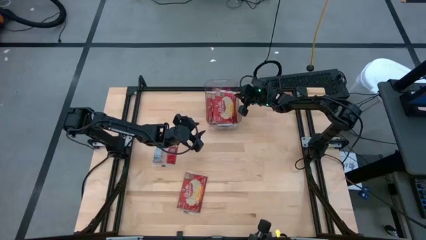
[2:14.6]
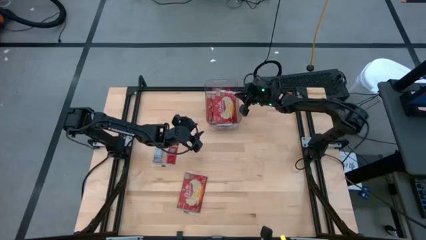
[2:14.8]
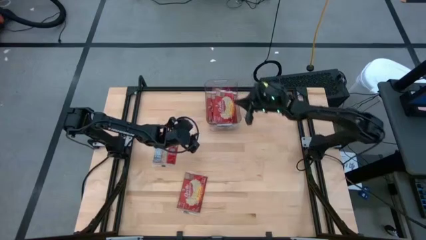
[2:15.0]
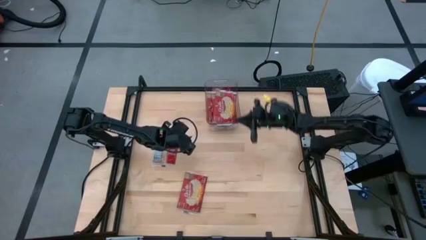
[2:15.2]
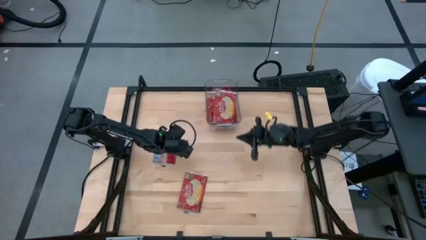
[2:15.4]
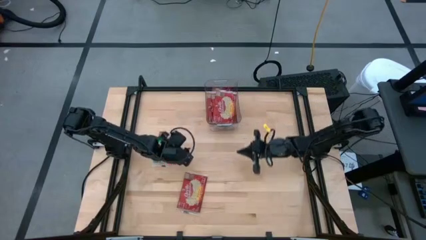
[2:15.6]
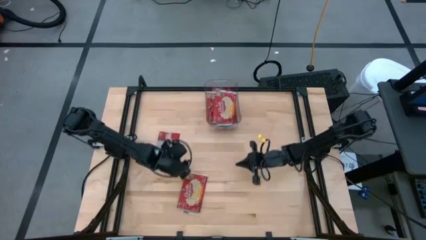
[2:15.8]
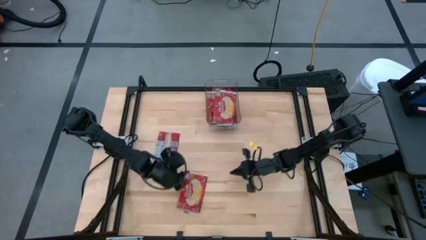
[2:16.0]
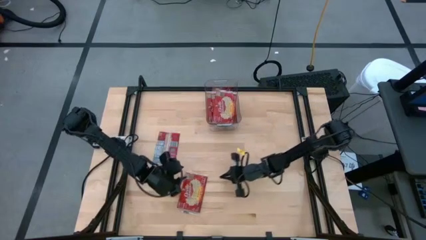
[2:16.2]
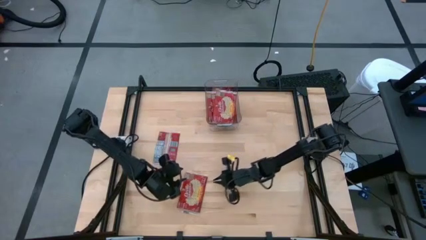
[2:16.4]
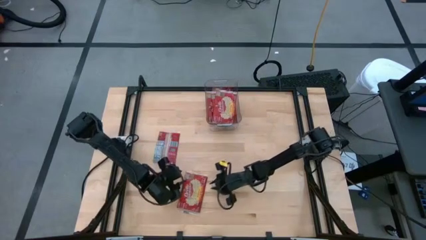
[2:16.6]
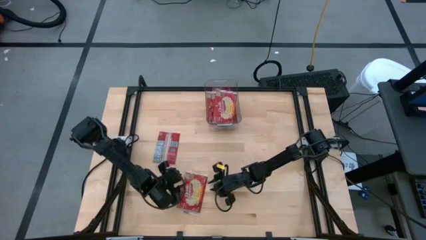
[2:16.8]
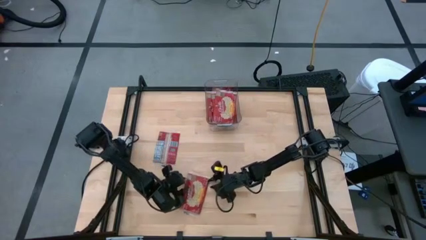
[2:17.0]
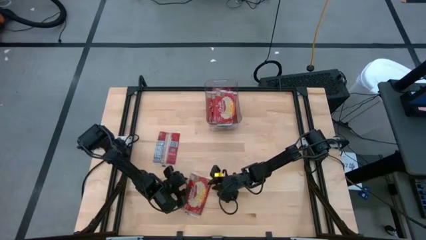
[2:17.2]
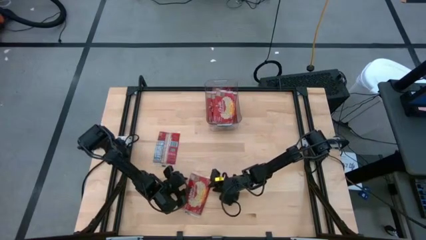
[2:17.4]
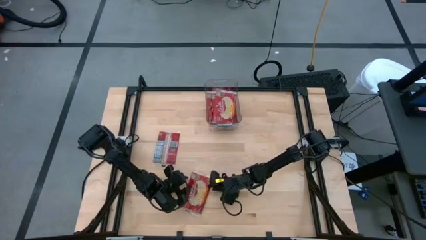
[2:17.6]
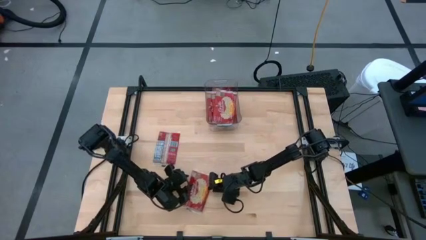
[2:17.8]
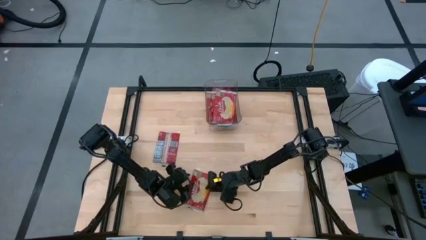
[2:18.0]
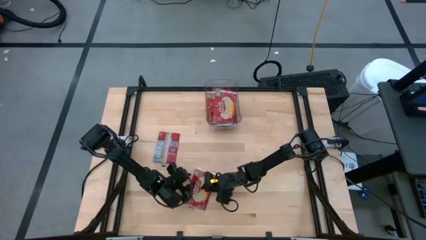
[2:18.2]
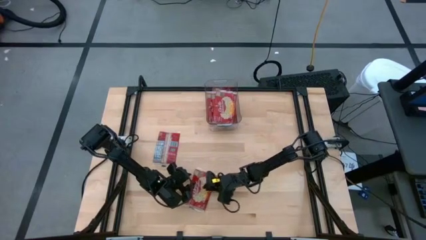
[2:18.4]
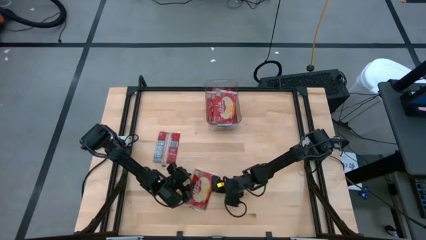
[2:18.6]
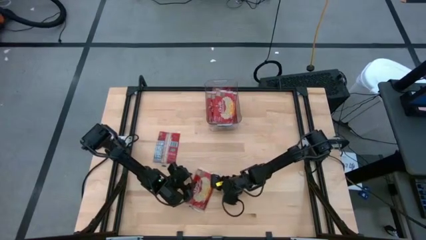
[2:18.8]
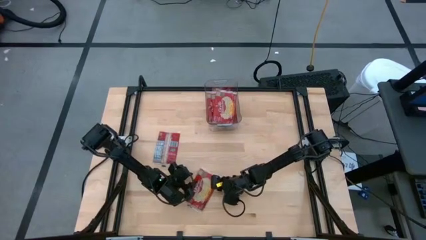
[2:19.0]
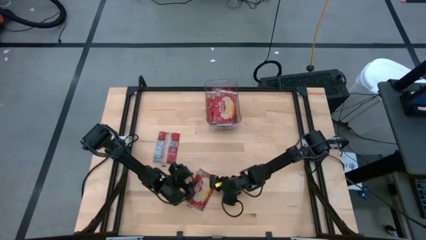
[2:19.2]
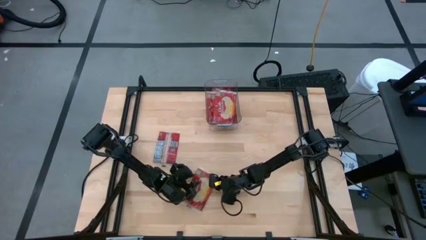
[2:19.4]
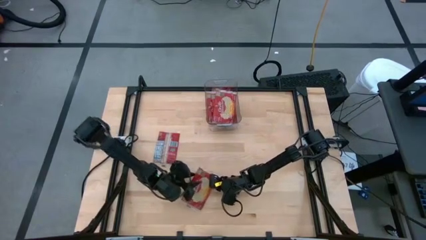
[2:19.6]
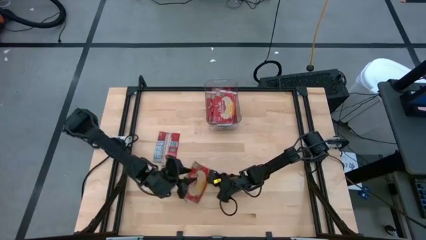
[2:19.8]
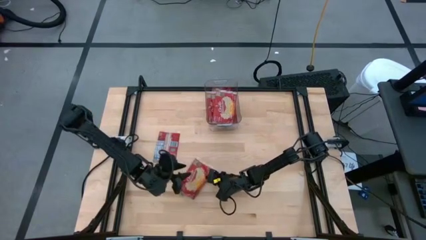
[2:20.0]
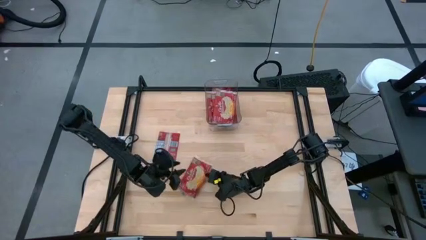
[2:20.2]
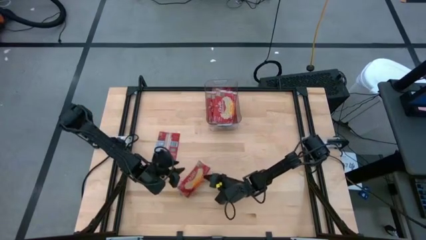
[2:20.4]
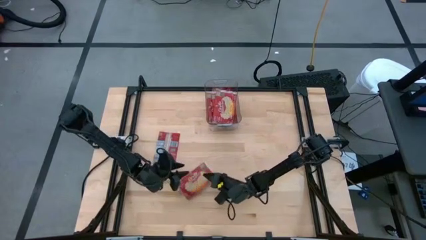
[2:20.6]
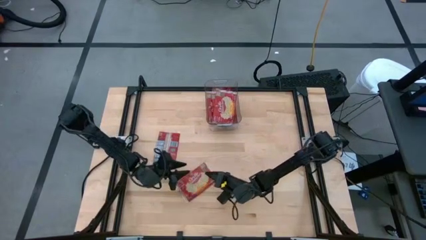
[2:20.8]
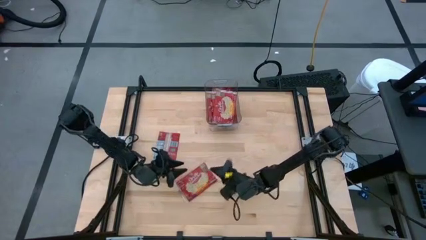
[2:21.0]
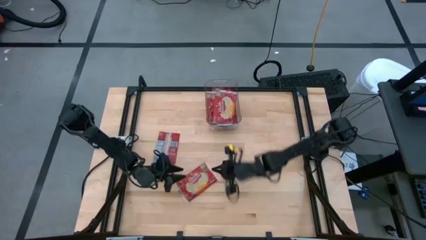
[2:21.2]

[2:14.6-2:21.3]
Task: Sort popcorn bags into baskets
Put the red popcorn pack into the transparent bin

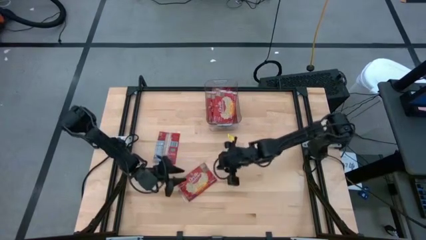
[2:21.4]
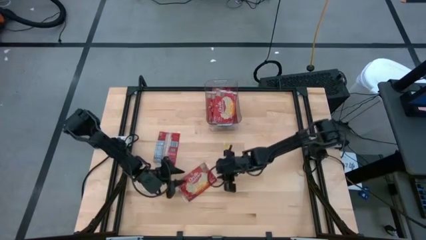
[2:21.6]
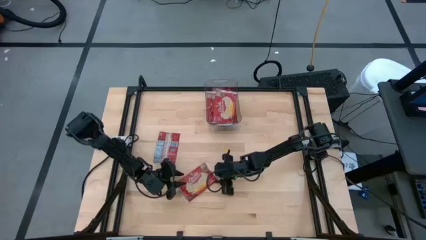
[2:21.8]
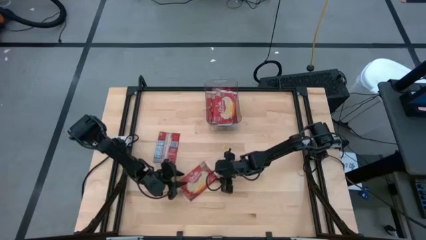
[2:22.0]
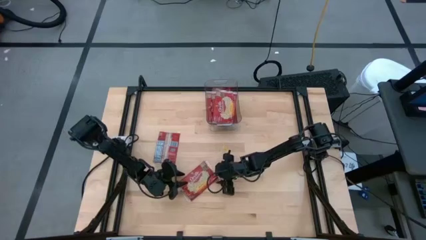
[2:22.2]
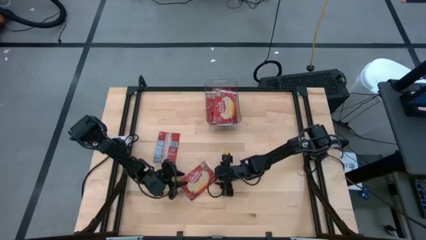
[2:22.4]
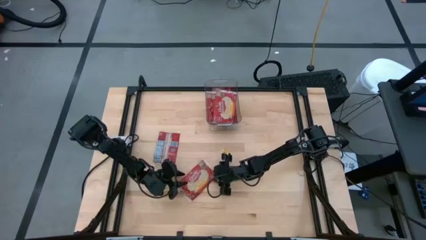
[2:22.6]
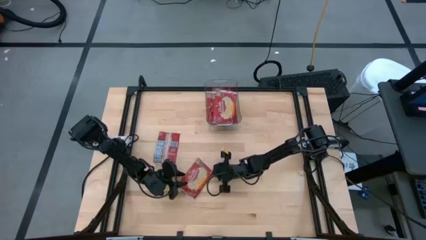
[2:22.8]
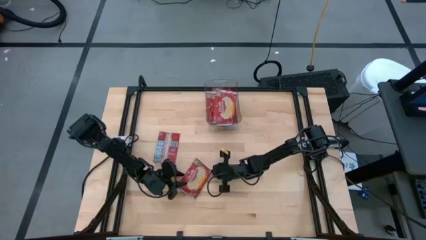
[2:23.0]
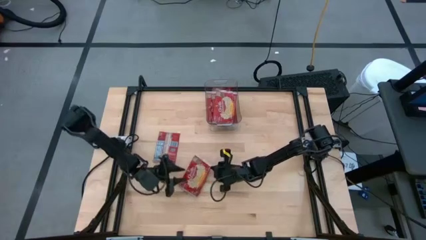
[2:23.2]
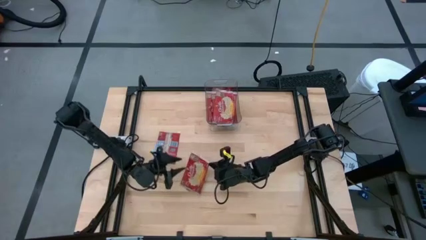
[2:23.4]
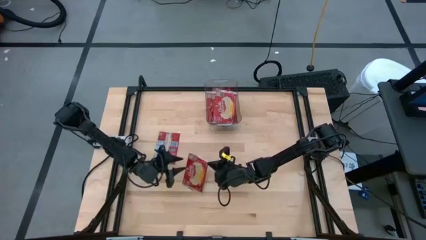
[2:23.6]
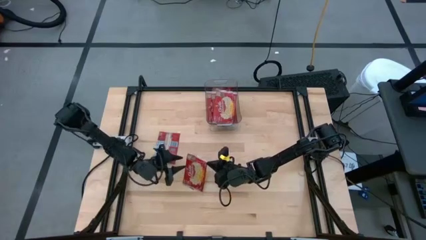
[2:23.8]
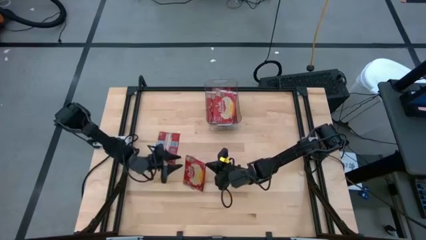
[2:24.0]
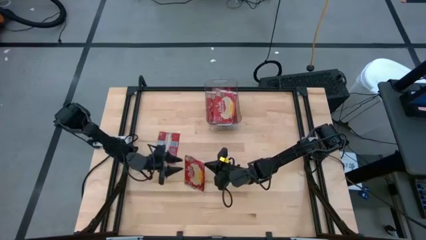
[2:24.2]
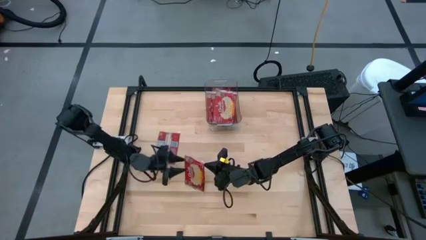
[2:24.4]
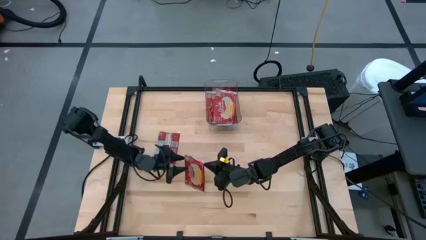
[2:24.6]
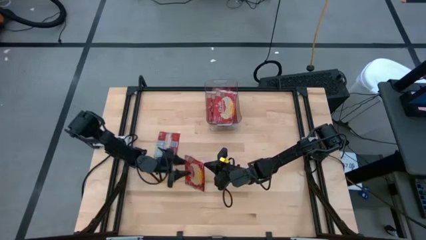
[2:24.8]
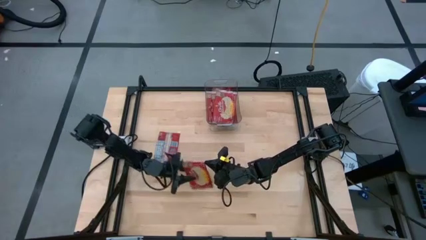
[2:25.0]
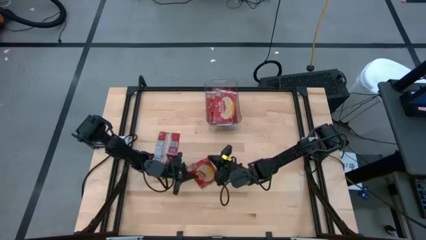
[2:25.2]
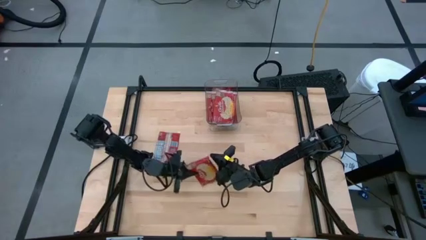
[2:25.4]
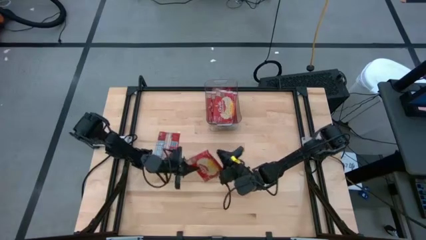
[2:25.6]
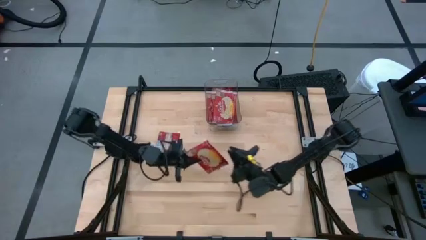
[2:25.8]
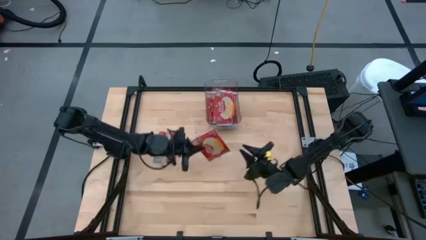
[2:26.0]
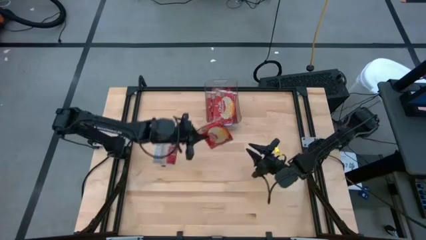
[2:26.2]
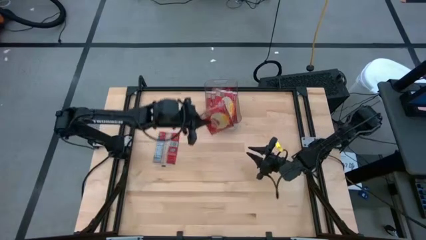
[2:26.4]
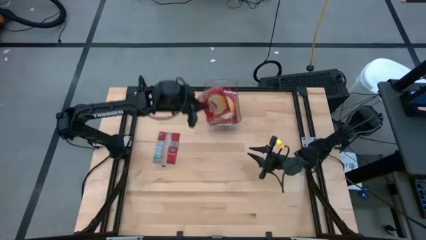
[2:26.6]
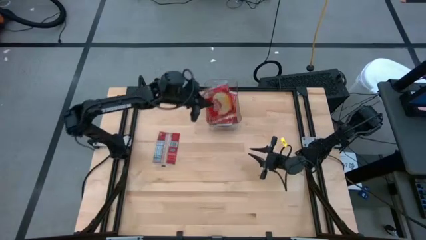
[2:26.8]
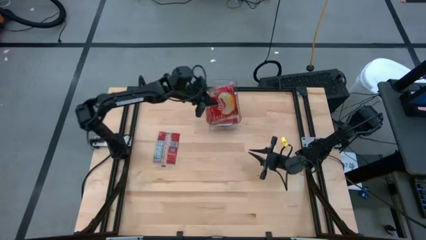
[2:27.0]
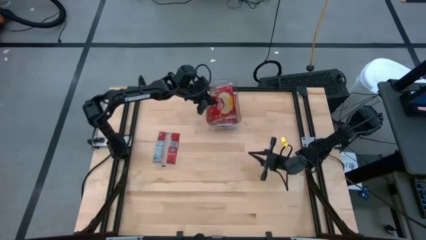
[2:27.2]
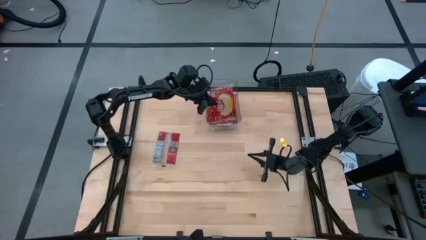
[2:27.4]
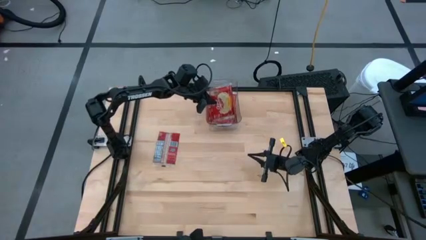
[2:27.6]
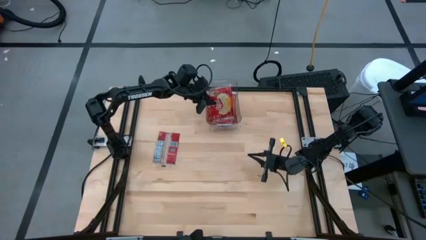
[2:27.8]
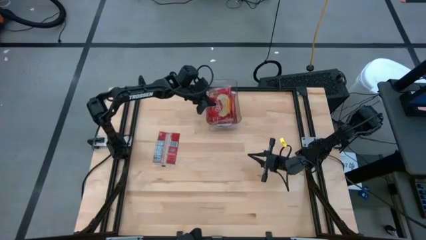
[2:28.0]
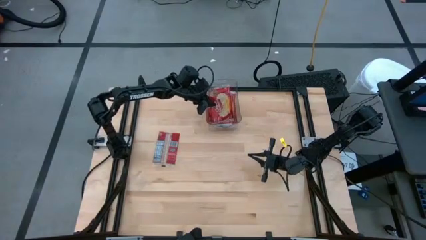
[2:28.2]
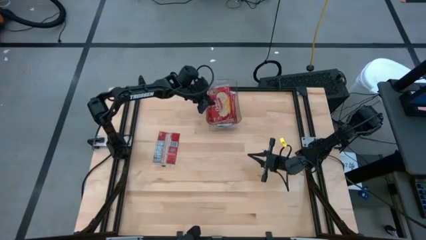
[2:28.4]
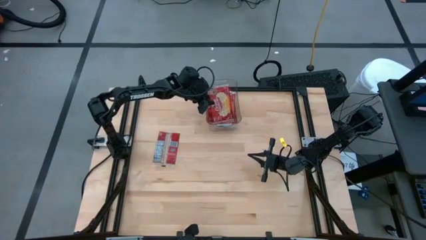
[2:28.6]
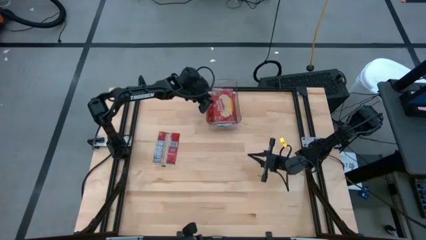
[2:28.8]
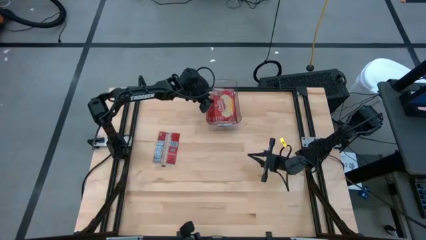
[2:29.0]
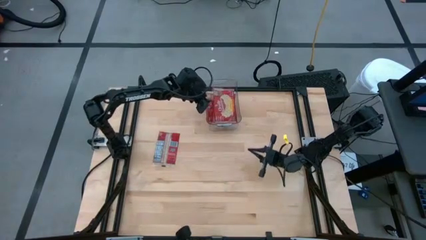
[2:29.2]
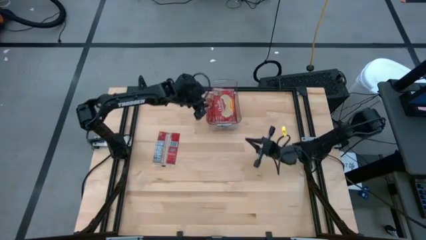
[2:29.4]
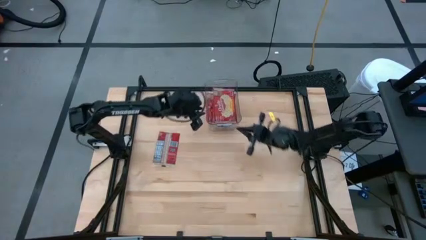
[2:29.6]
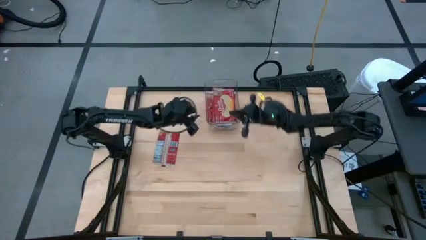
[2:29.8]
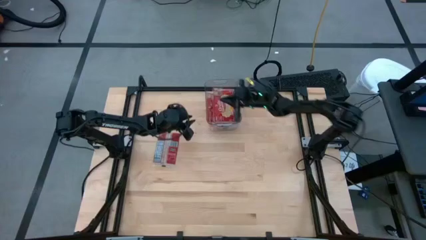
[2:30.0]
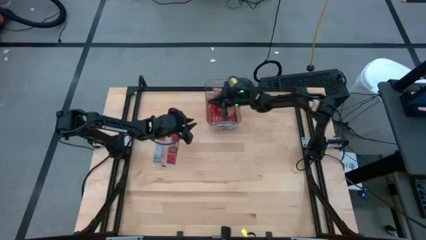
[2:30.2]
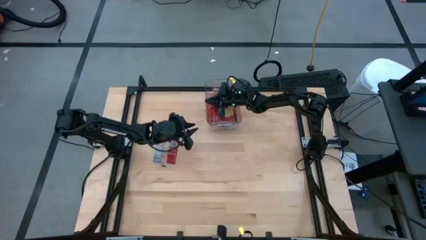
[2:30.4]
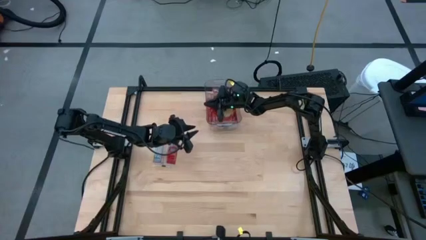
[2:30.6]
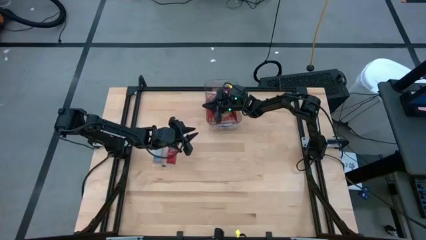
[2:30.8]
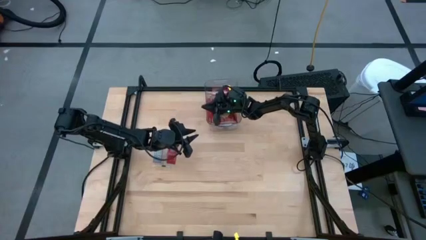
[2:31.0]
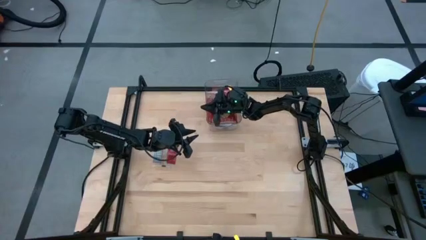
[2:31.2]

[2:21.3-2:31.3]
Put the red popcorn pack into the transparent bin
